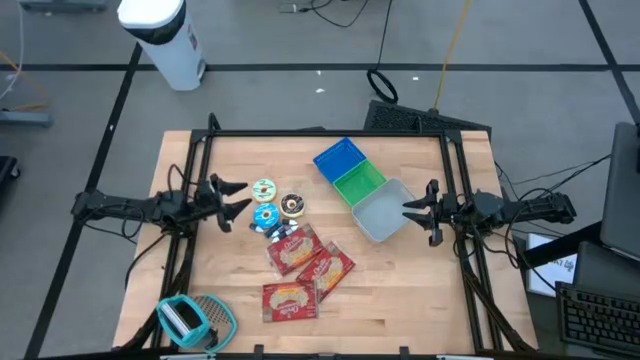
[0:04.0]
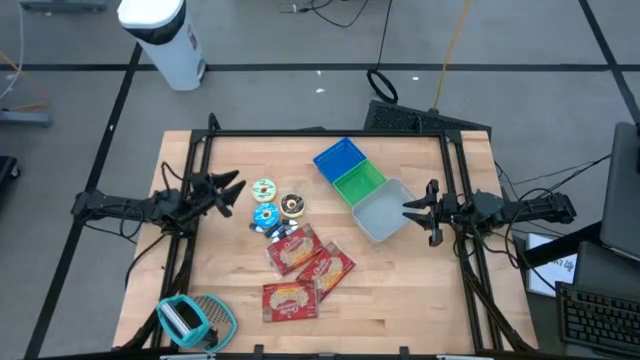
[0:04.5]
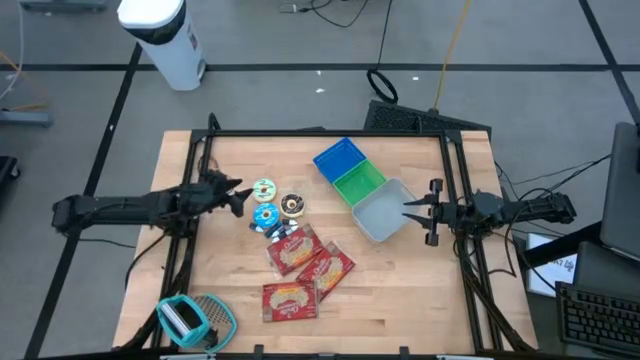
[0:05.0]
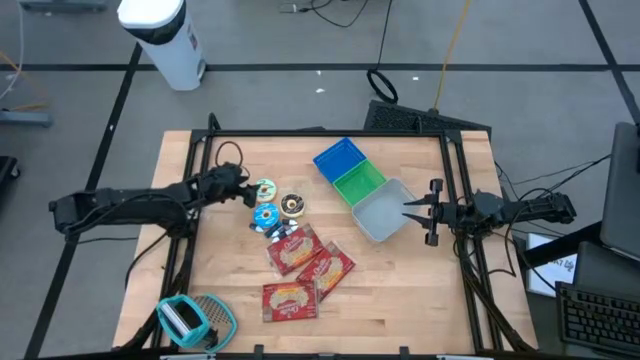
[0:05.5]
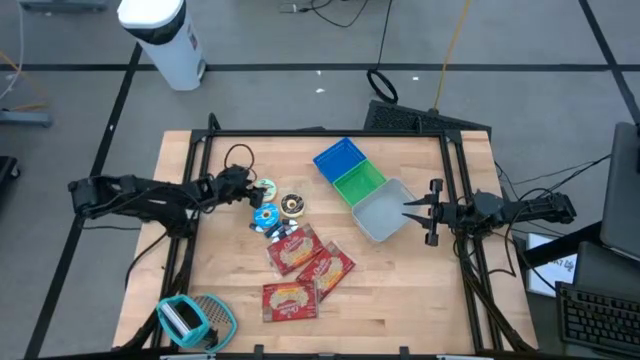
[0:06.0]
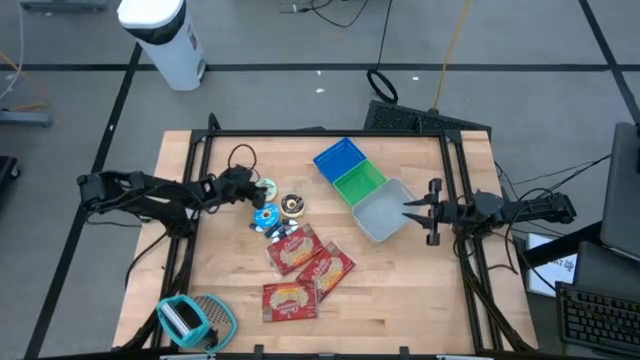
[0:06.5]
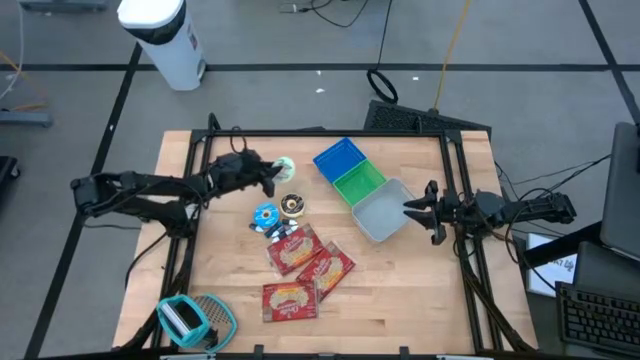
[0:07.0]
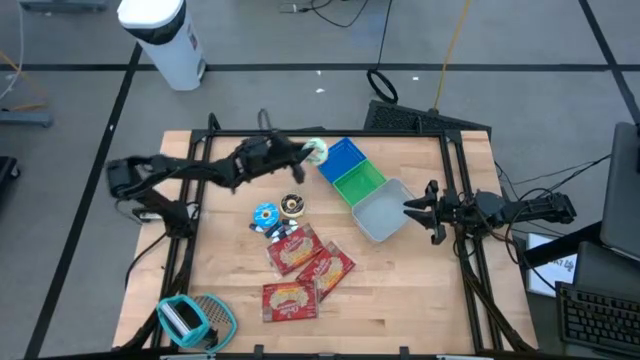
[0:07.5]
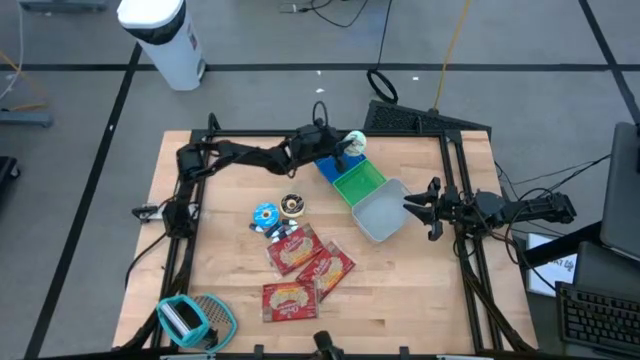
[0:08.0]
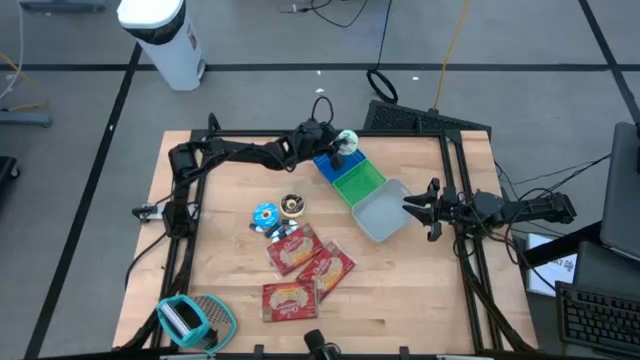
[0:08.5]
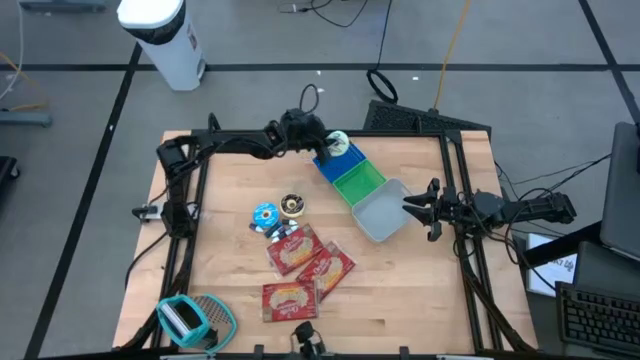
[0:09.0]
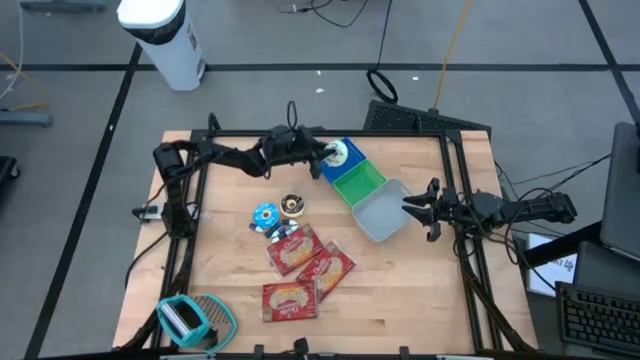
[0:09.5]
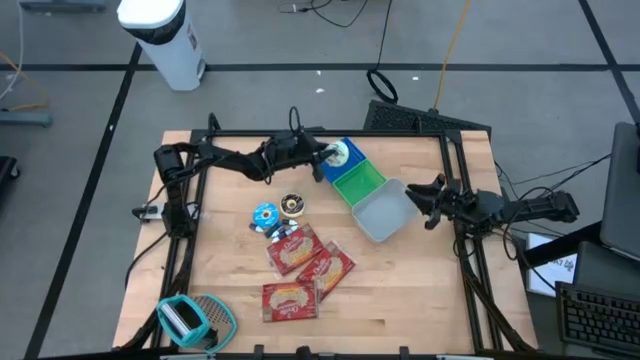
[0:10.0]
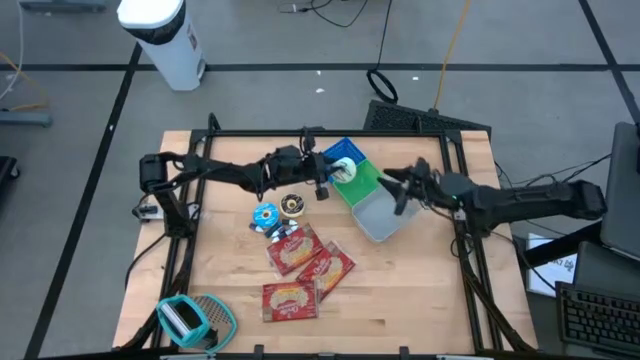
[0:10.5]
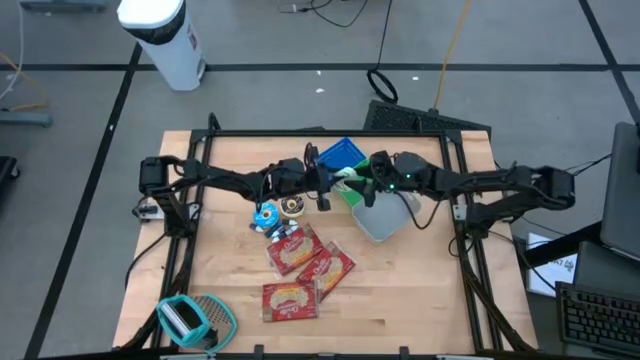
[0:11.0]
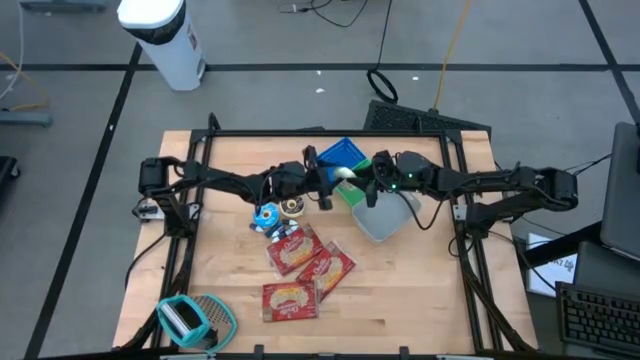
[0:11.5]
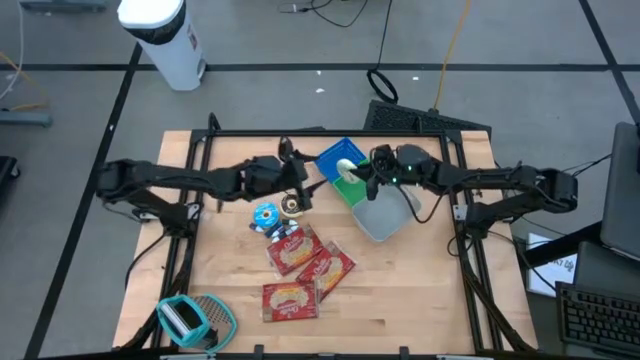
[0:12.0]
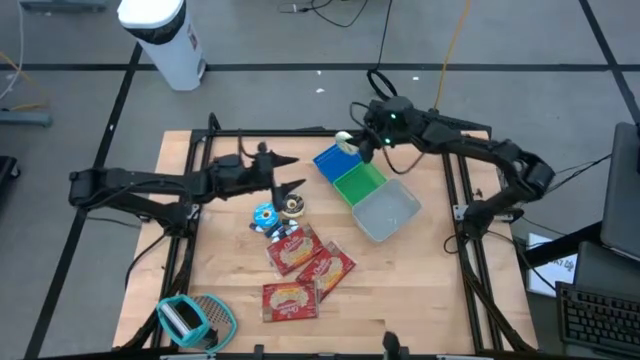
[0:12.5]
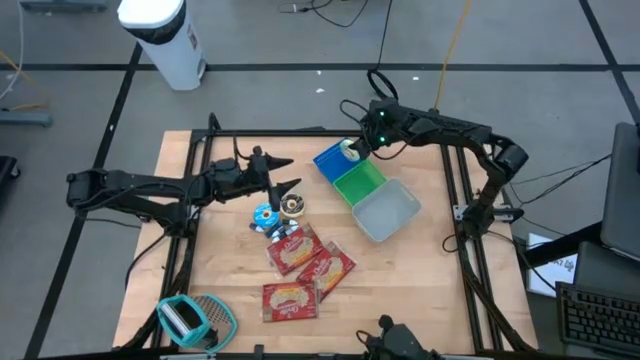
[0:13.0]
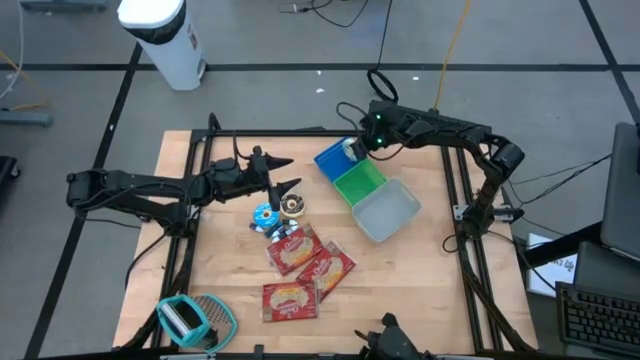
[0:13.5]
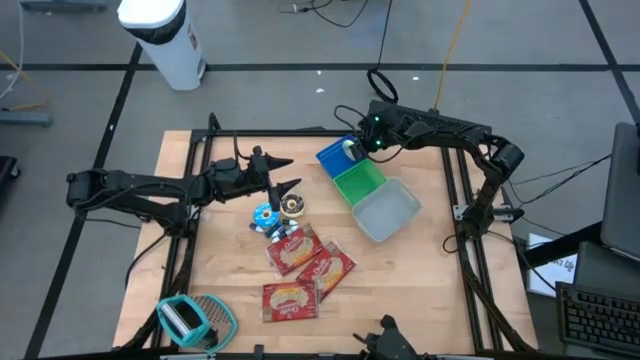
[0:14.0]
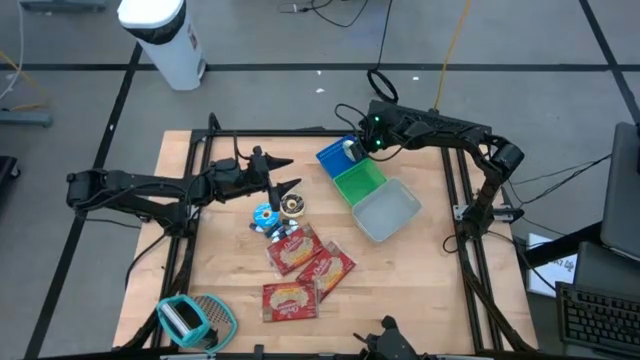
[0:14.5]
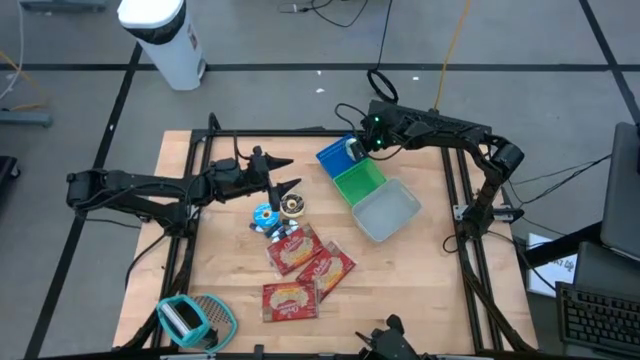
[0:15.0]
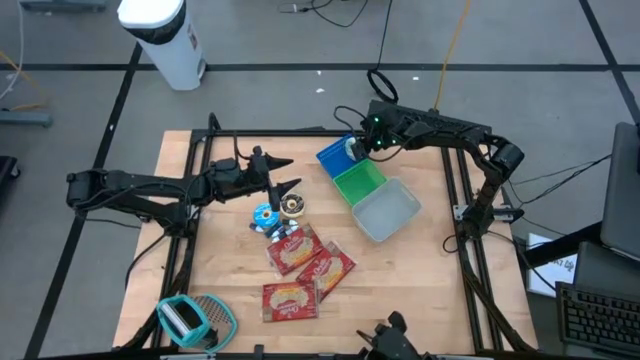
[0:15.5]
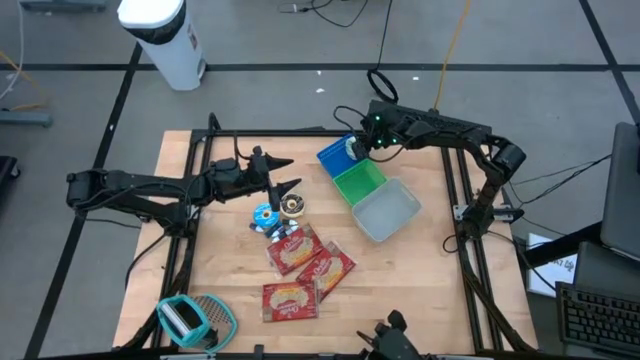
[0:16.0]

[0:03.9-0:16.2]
Put the light blue donut into the blue bin

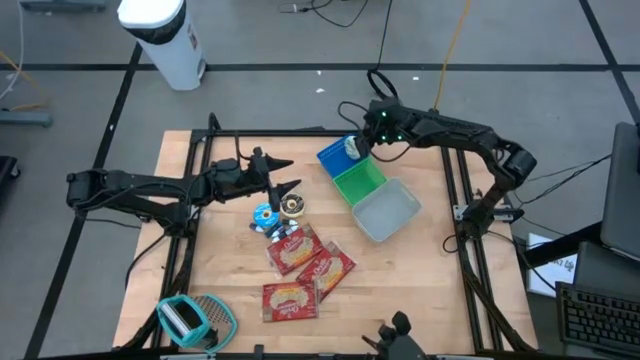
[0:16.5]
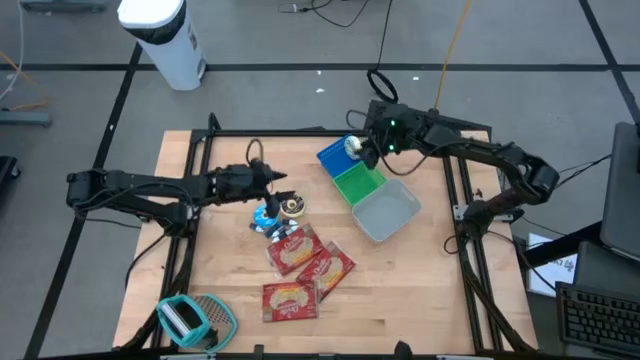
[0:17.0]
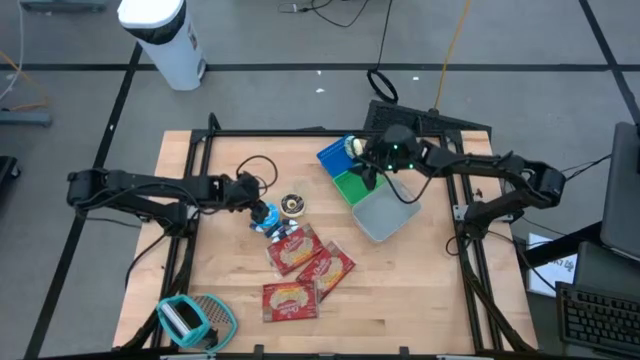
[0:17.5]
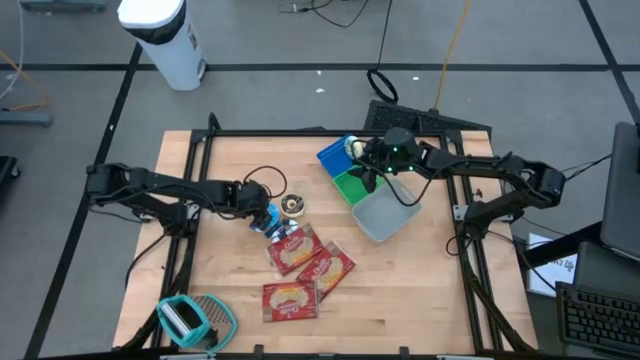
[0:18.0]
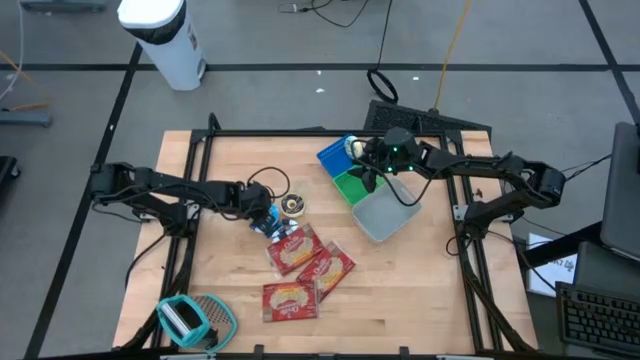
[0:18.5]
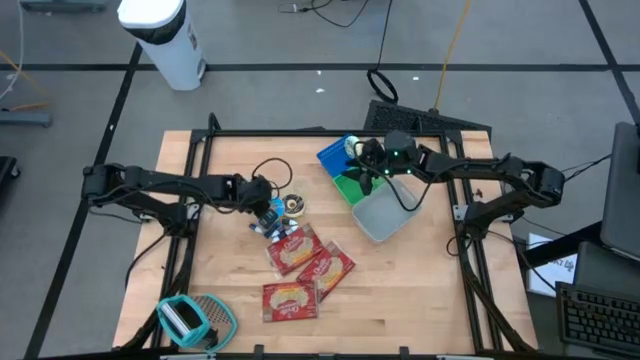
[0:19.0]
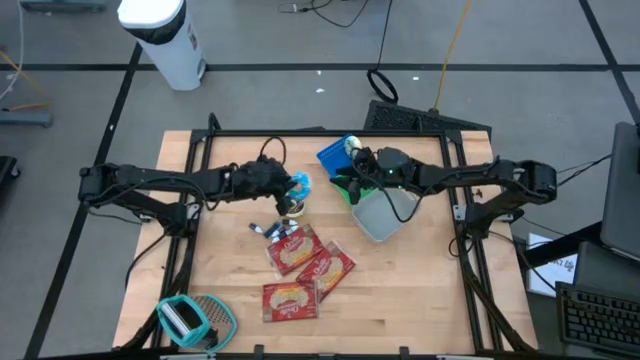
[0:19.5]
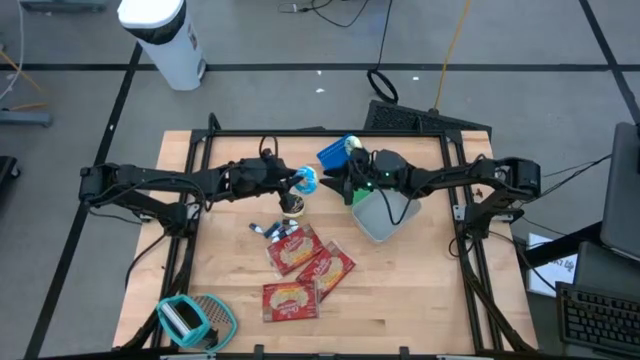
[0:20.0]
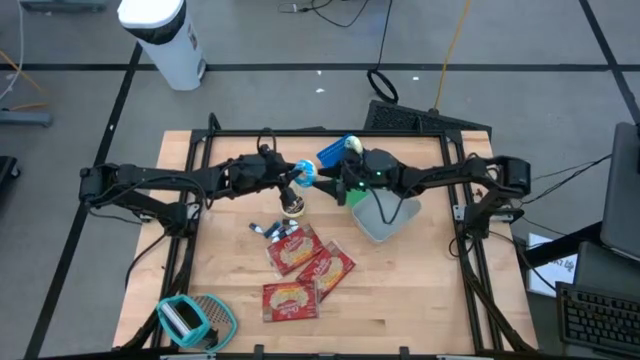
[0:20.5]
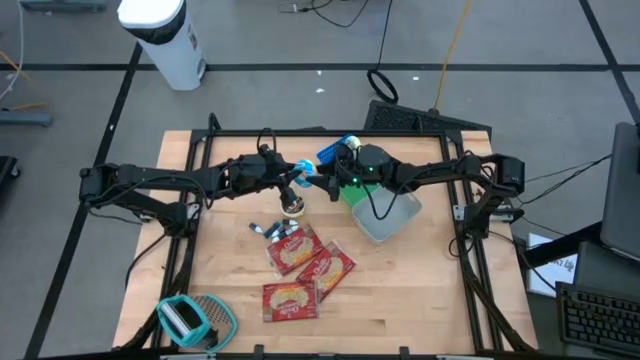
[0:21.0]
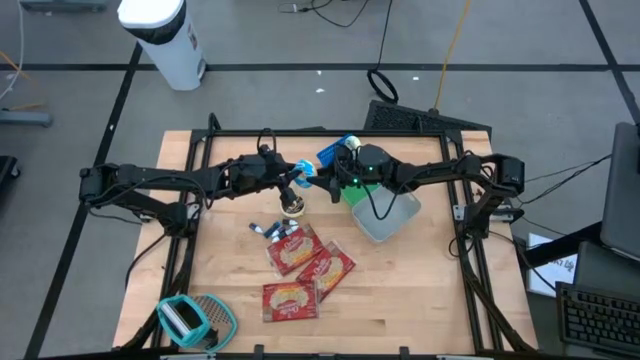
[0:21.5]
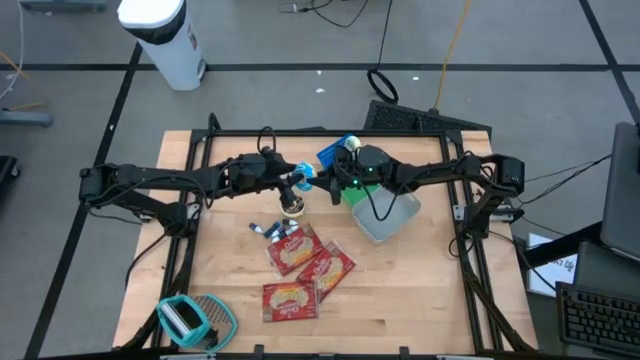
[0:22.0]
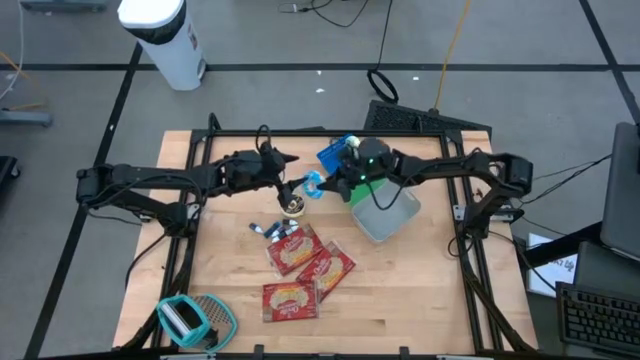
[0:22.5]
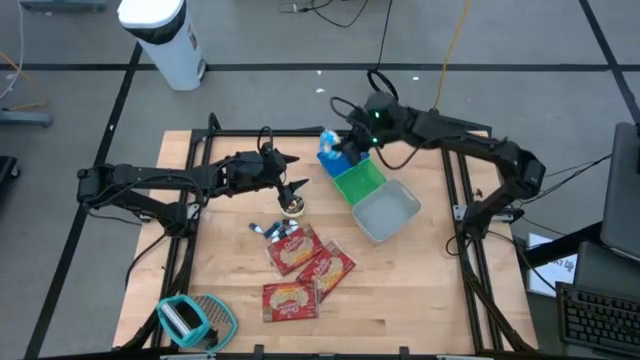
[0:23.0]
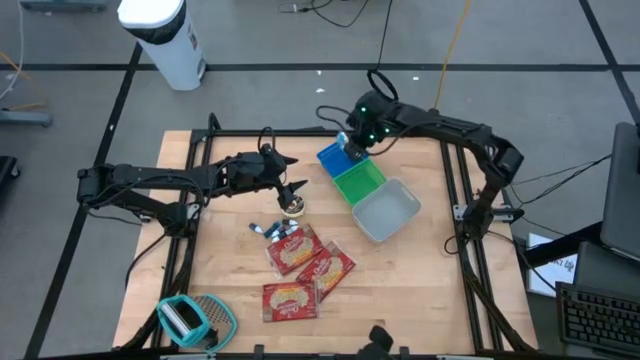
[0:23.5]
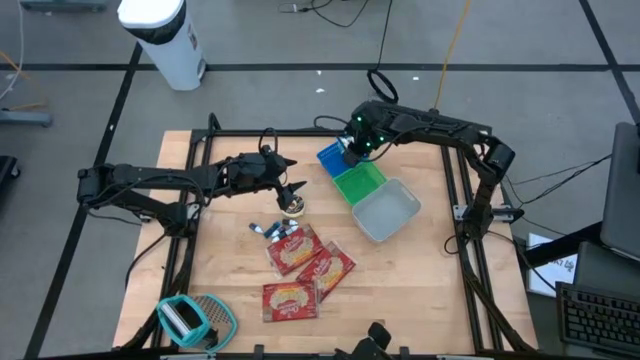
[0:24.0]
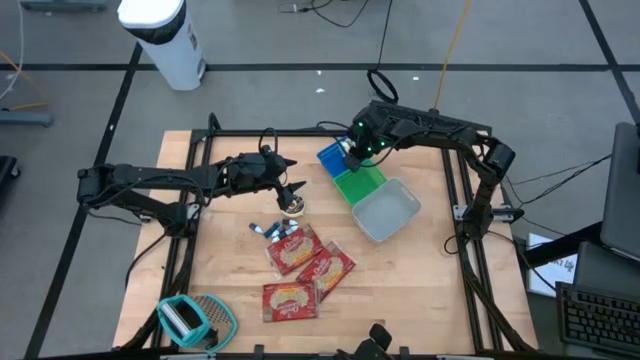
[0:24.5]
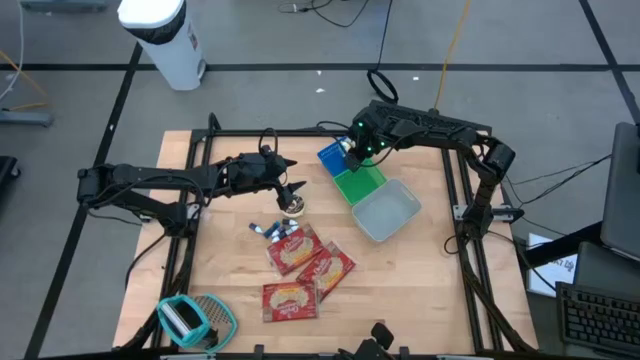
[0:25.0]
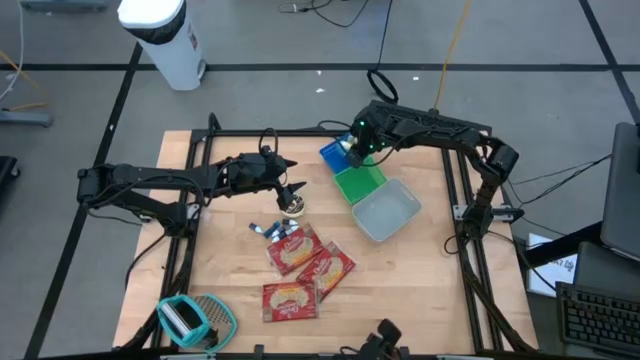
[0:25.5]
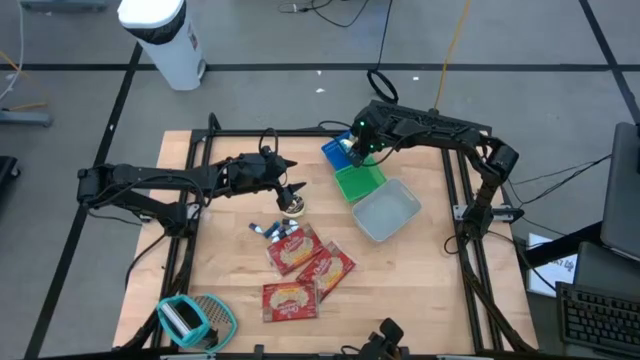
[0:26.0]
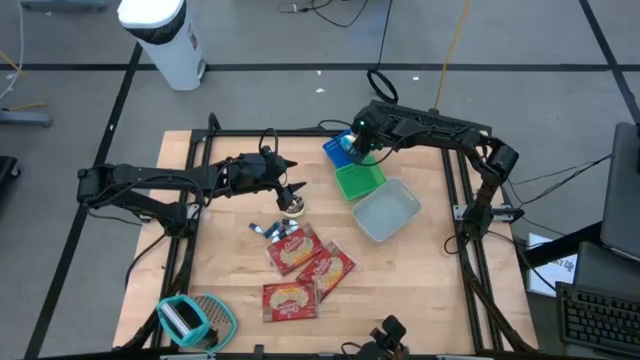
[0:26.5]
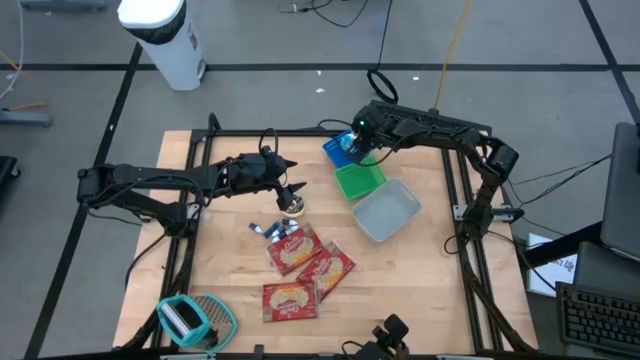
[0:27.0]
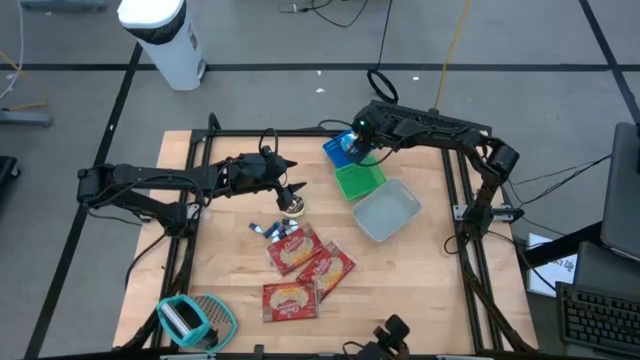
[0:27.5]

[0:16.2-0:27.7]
Put the blue donut into the blue bin
